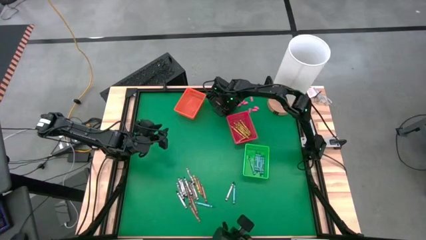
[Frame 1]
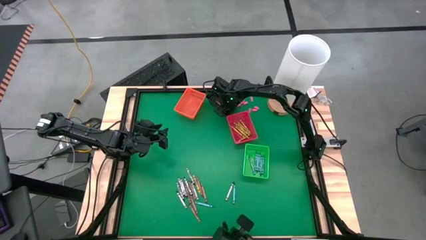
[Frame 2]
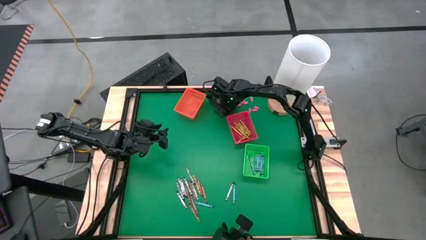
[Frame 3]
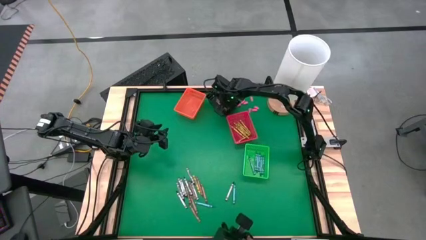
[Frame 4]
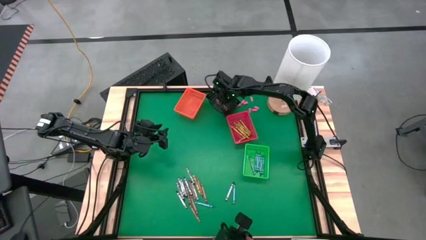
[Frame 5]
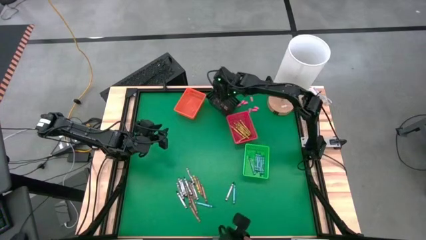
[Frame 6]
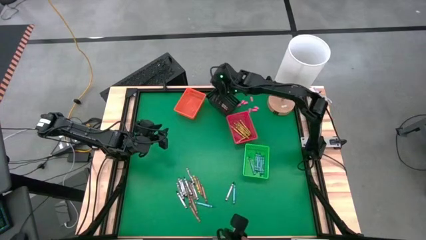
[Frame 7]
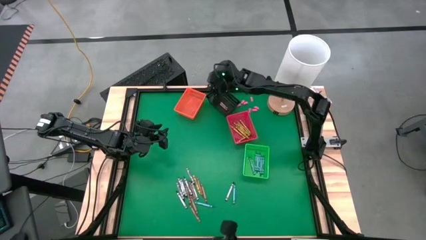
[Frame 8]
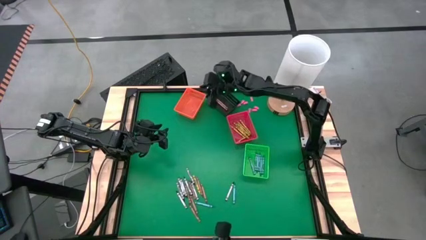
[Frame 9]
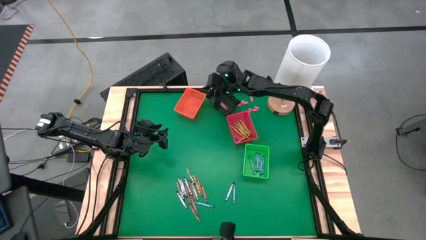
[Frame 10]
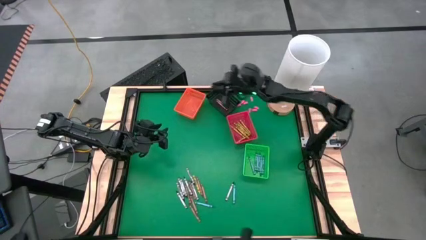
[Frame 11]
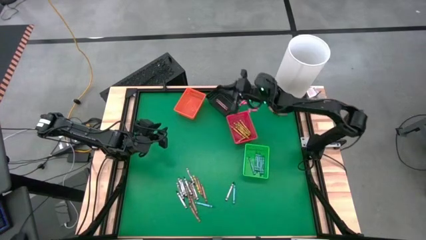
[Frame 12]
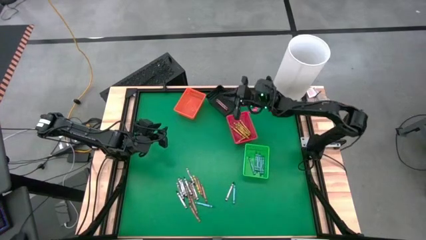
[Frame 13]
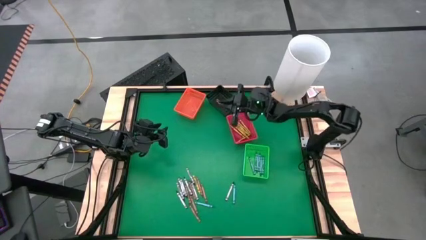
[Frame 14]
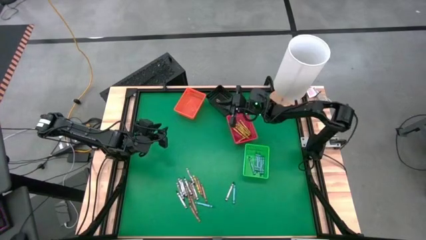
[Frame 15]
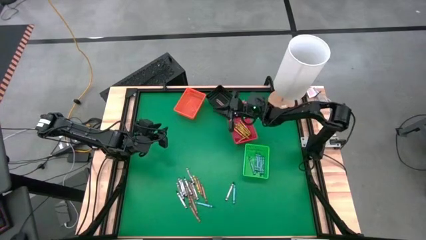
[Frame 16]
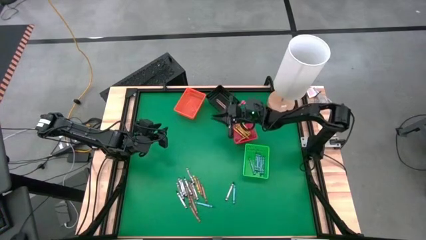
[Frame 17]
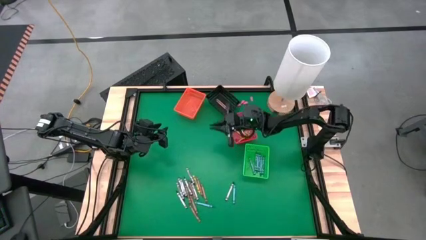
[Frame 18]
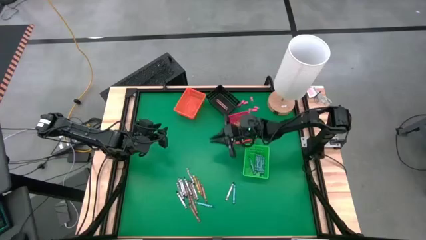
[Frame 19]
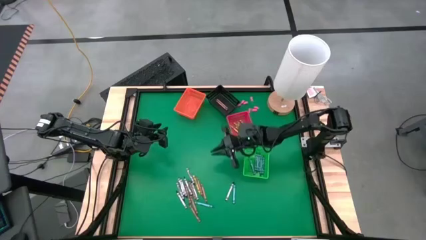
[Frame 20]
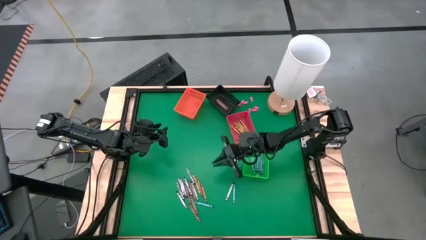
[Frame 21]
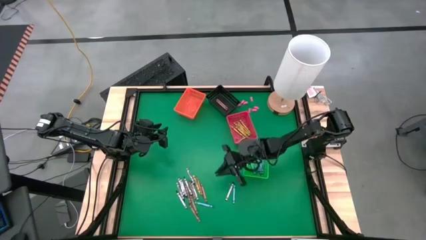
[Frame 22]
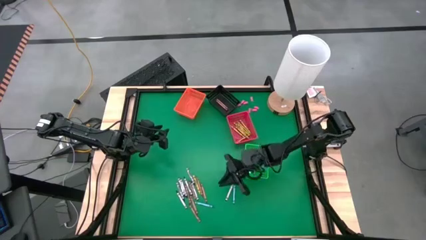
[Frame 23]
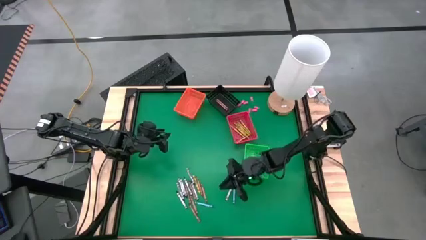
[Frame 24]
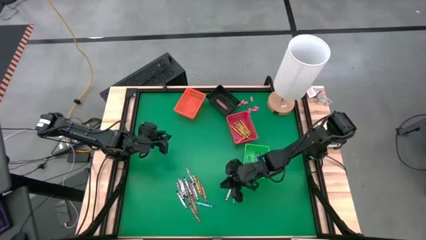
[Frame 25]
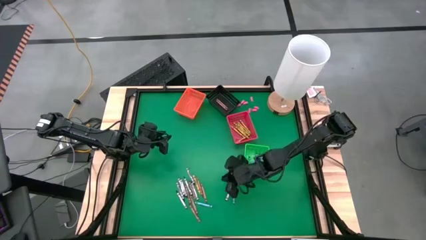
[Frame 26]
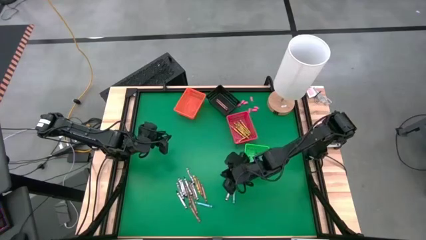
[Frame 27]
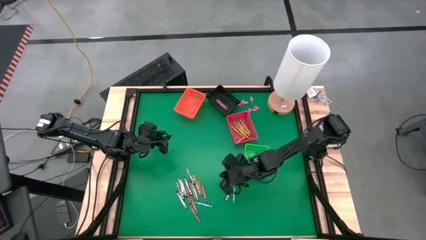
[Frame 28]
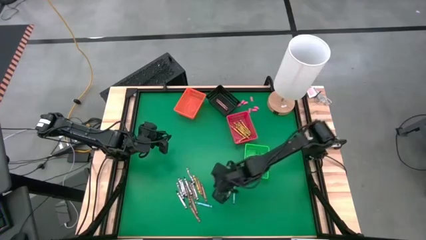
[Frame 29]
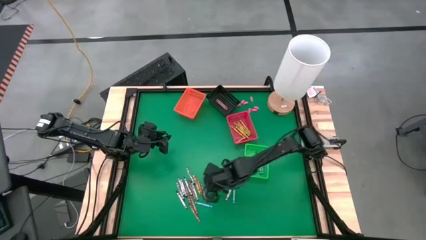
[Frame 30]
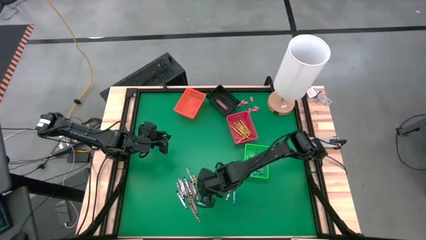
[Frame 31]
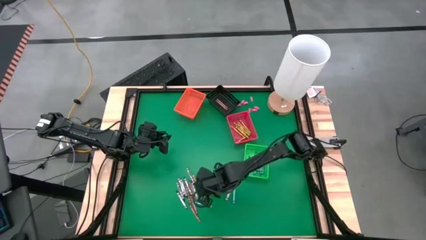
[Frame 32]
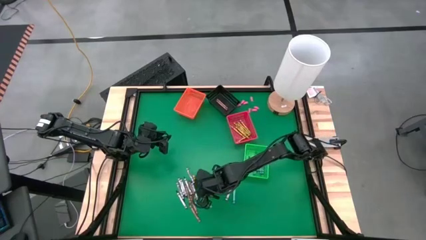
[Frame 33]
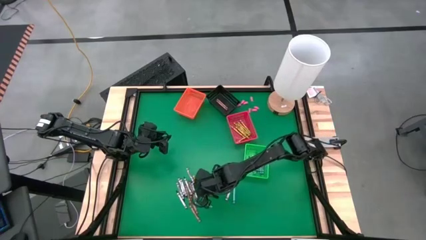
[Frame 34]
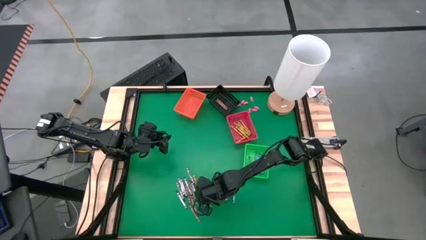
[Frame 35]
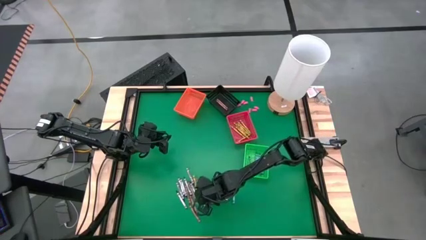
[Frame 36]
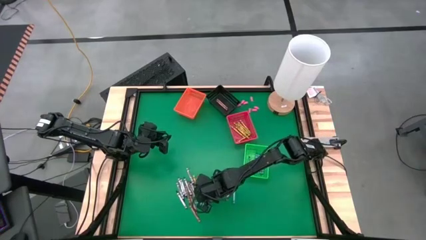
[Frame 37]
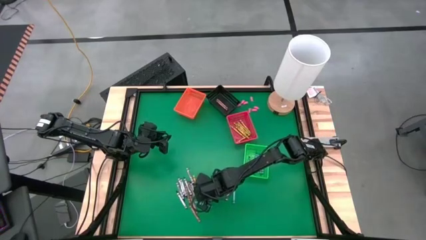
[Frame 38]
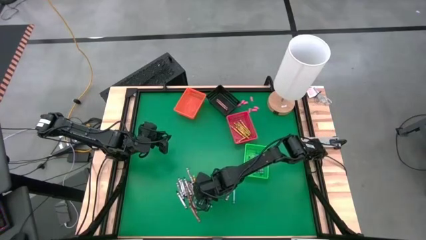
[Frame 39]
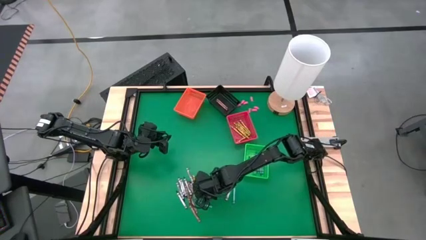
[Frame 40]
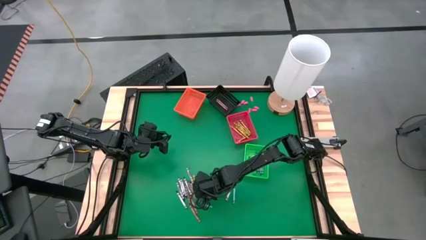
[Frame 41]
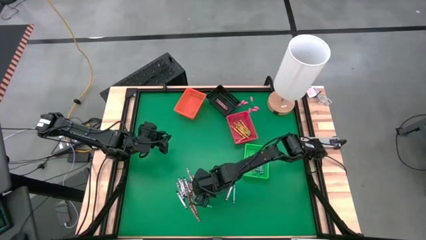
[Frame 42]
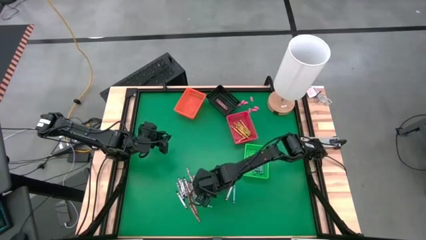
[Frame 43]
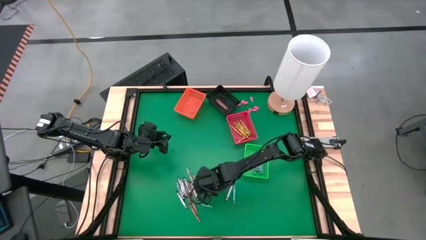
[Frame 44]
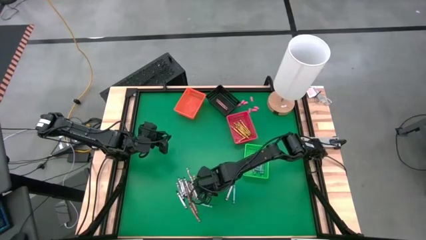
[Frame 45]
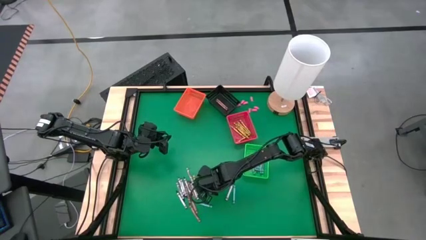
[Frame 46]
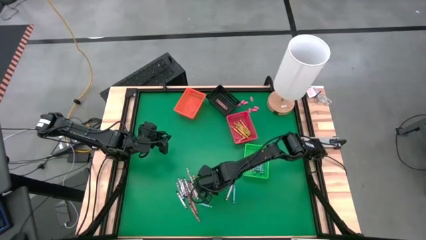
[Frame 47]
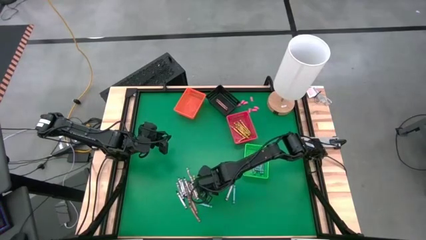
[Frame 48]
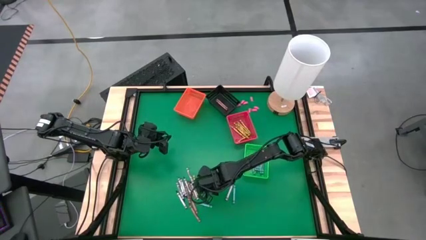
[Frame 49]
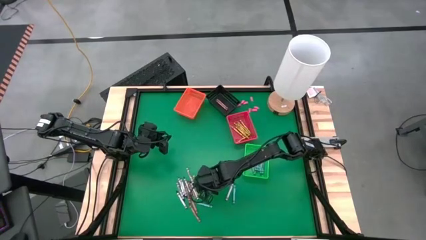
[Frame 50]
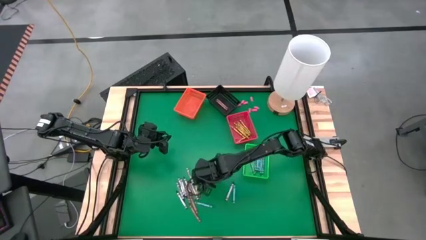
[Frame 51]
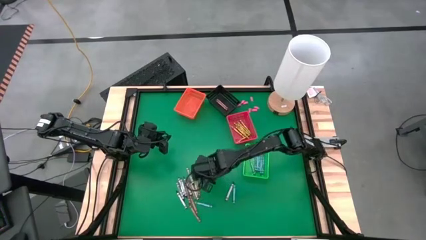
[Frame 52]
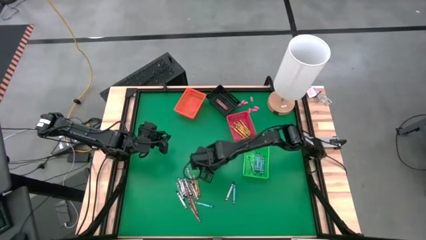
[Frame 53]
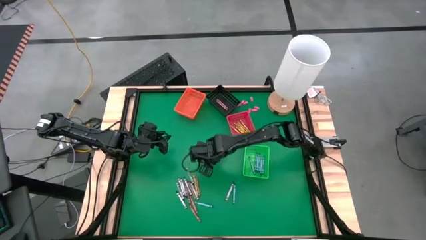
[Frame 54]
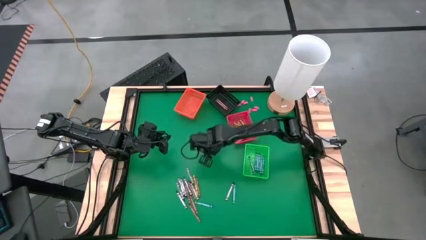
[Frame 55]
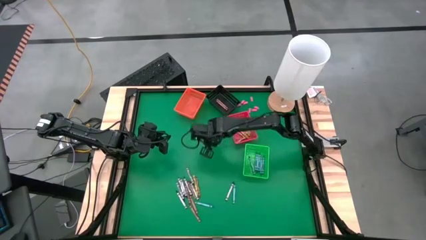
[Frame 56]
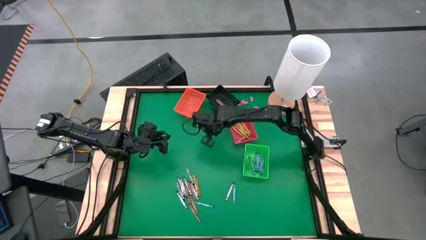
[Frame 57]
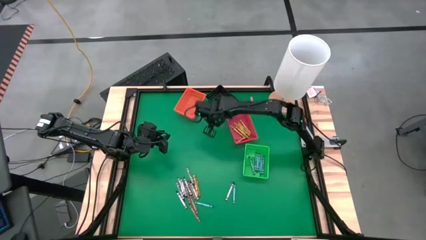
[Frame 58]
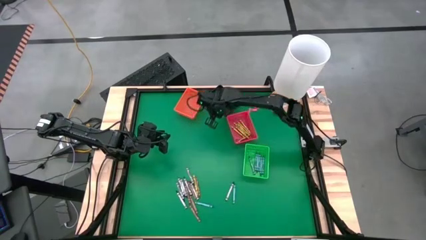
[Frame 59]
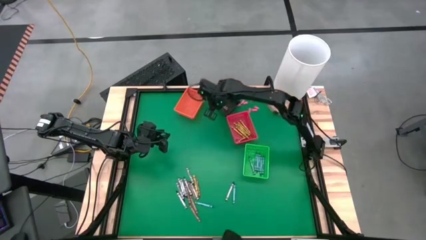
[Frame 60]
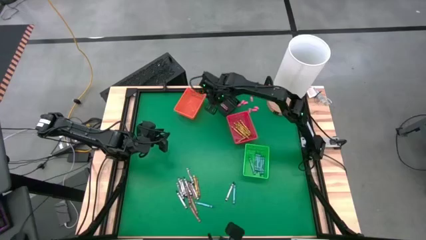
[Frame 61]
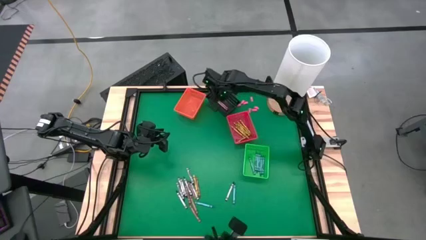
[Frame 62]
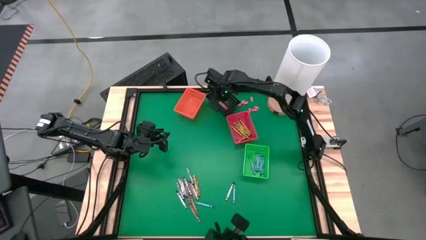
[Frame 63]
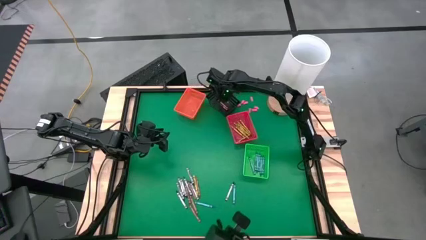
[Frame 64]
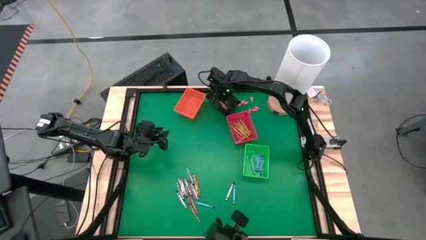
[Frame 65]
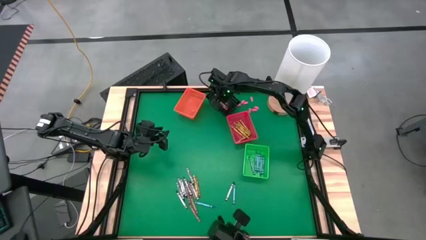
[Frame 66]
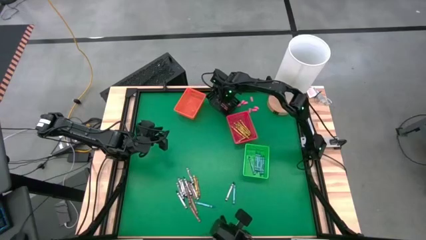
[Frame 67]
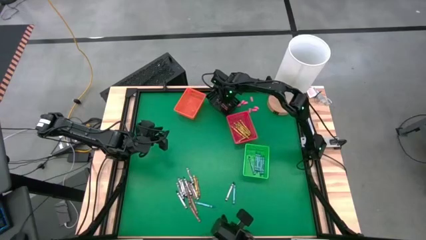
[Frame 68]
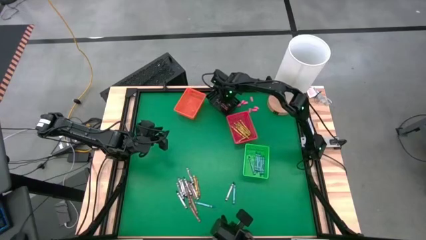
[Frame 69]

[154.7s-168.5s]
Task: Sort crayons
Put the brown crayon into the black bin
